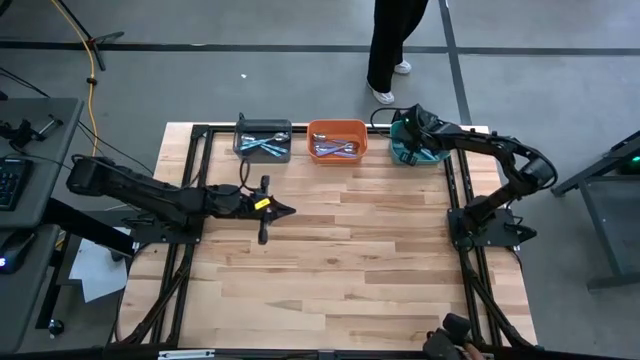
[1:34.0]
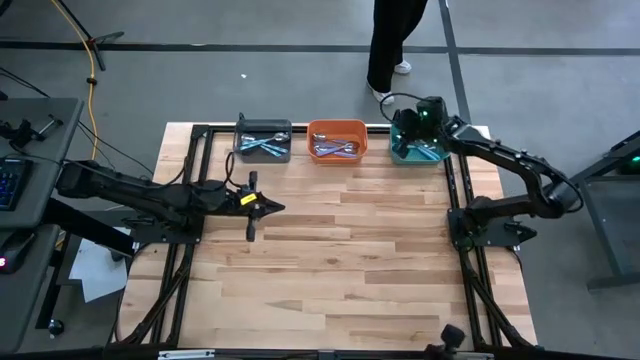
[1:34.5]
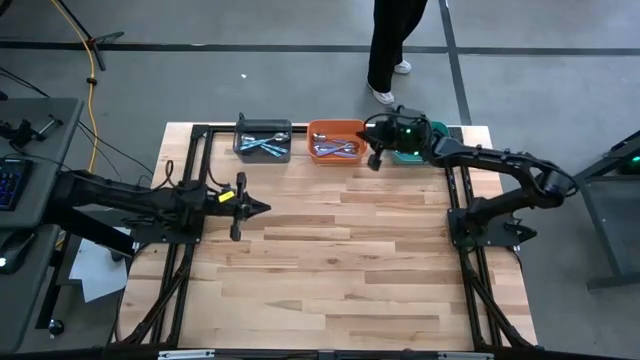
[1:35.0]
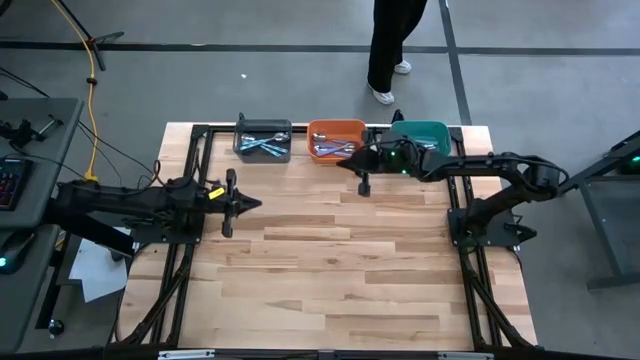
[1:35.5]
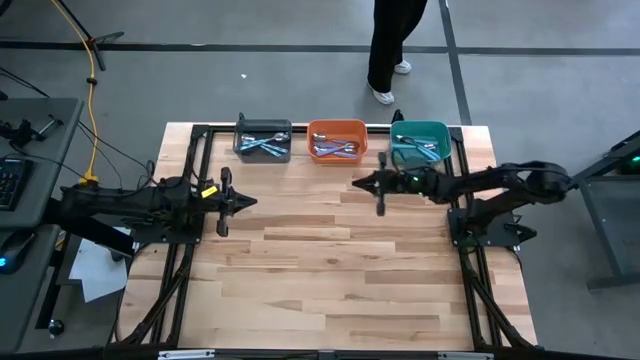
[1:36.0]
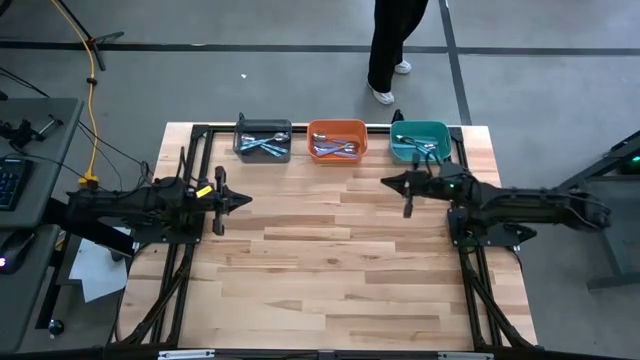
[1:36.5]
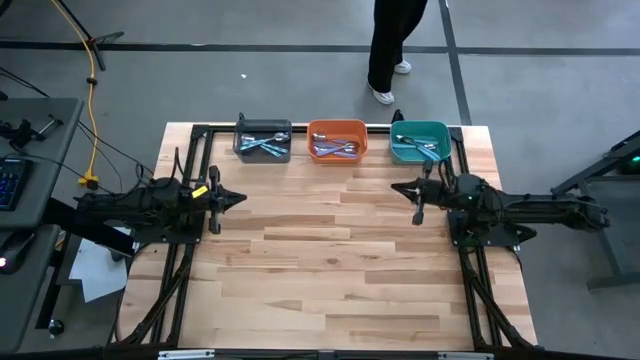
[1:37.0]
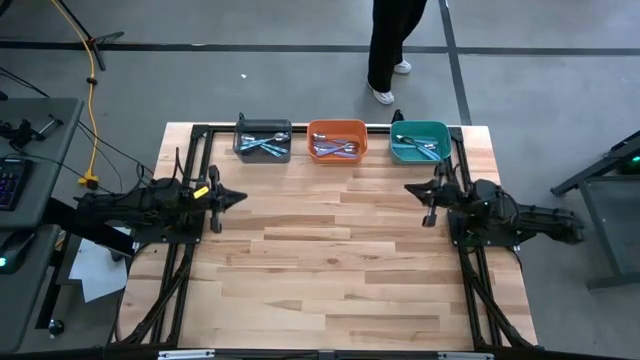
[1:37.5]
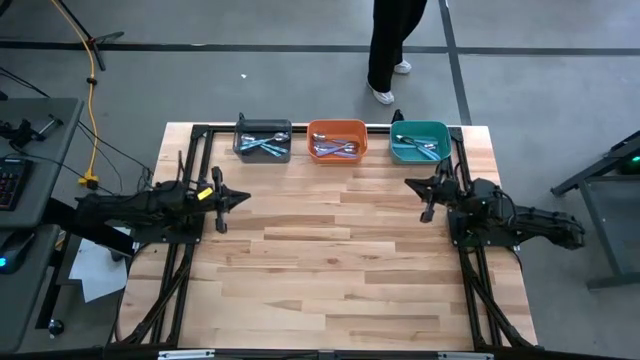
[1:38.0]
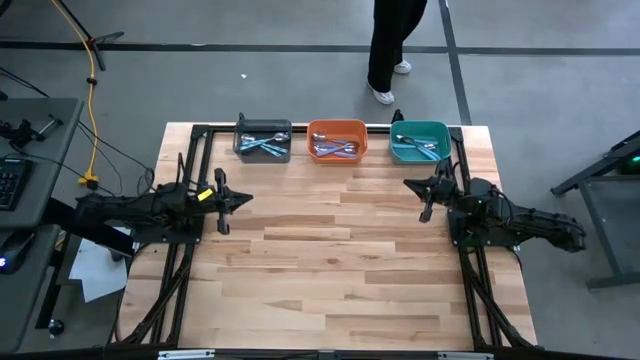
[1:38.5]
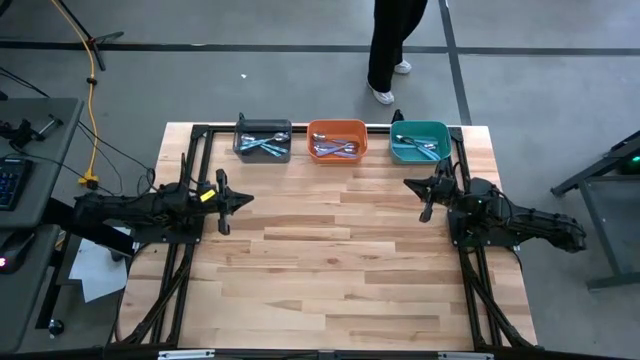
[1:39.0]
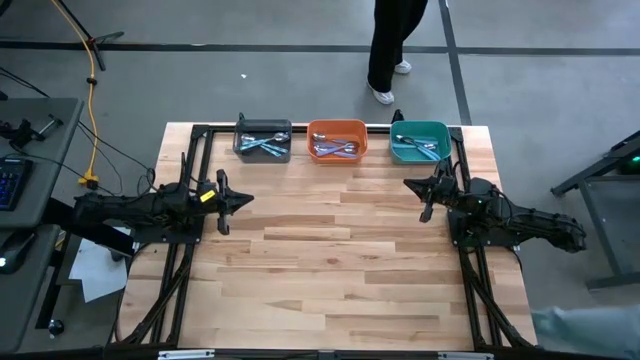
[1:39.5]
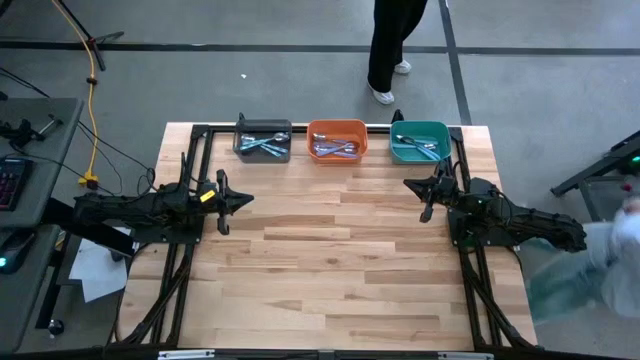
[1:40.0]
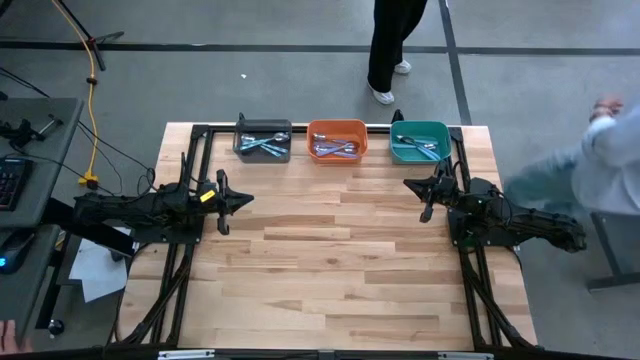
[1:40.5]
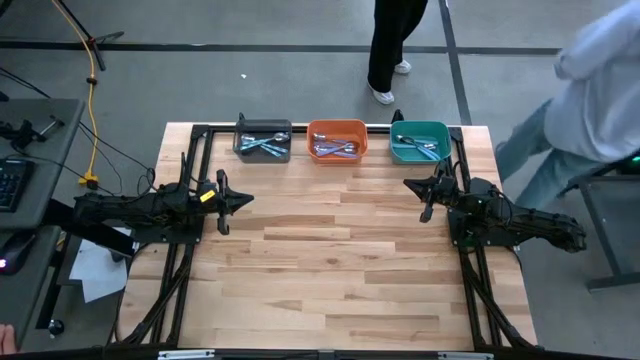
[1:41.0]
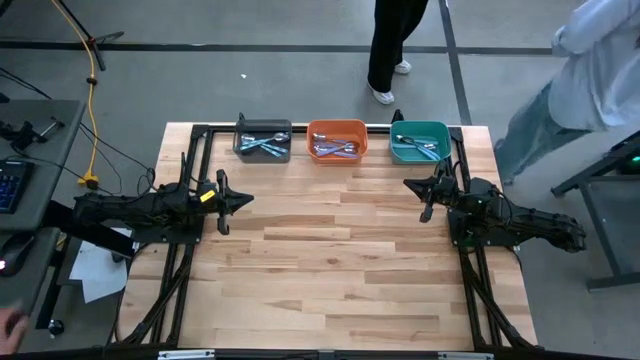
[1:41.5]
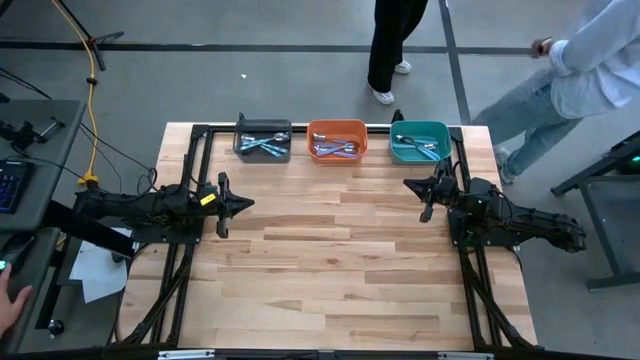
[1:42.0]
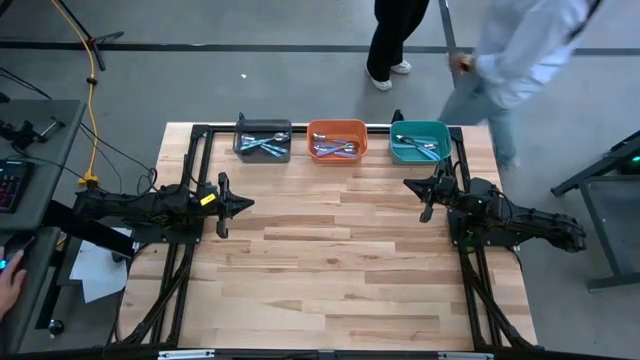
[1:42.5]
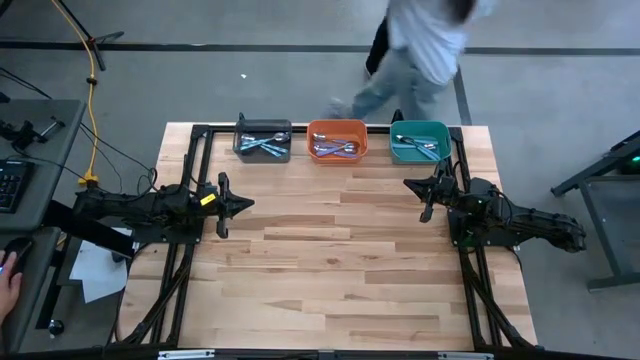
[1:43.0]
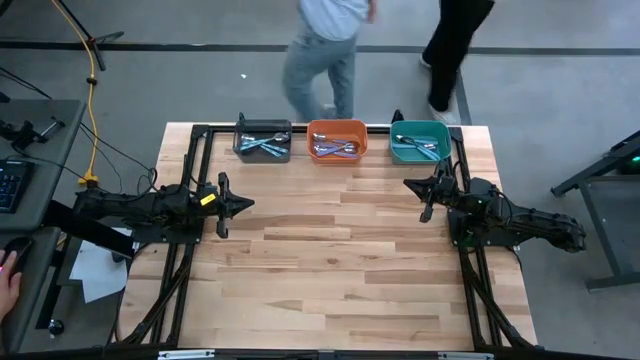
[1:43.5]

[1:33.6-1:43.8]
Task: Sort silverware by color (type)
Return to Home Position

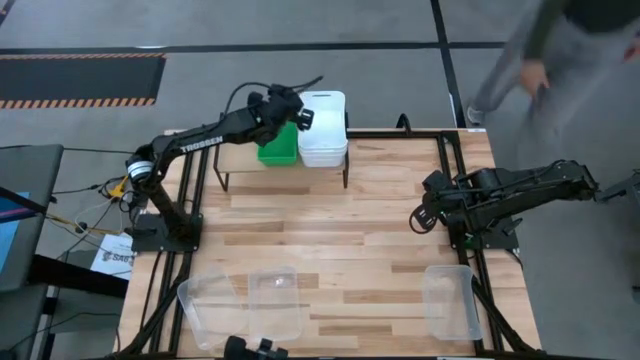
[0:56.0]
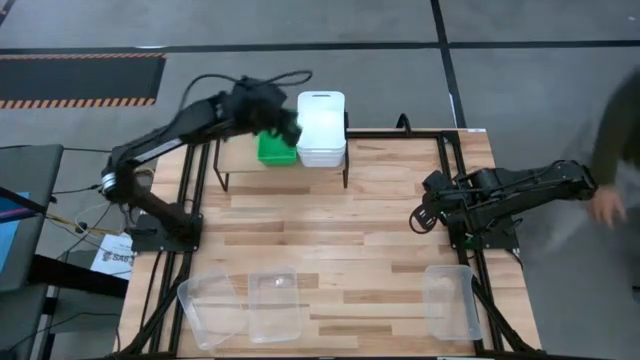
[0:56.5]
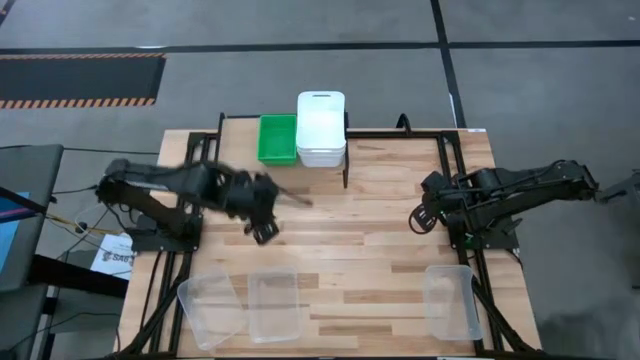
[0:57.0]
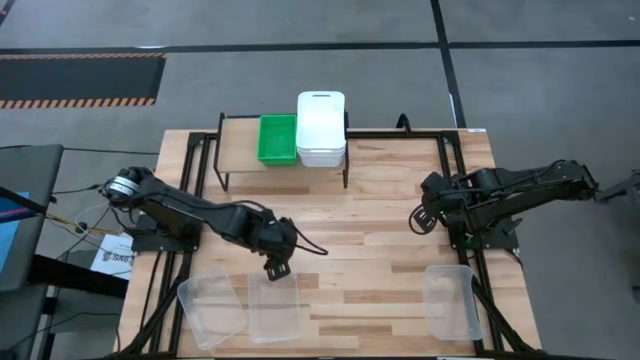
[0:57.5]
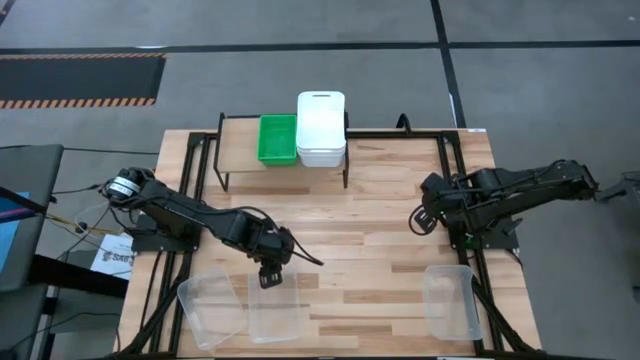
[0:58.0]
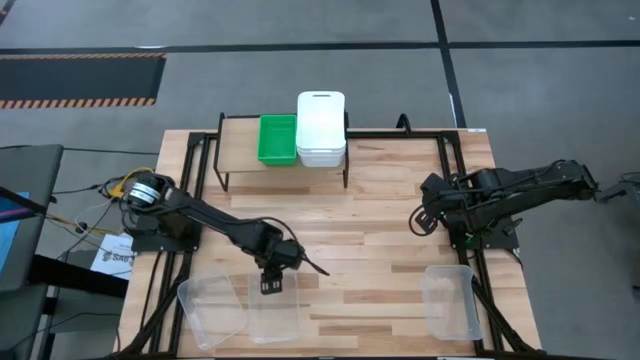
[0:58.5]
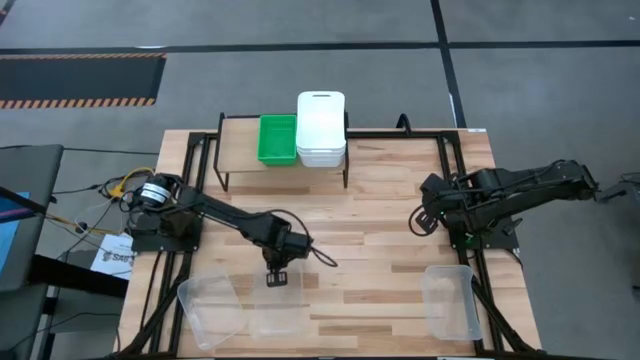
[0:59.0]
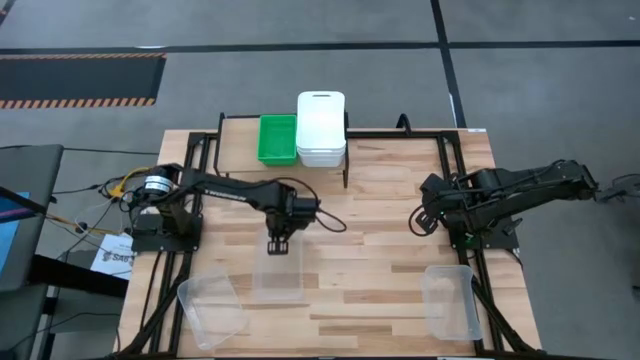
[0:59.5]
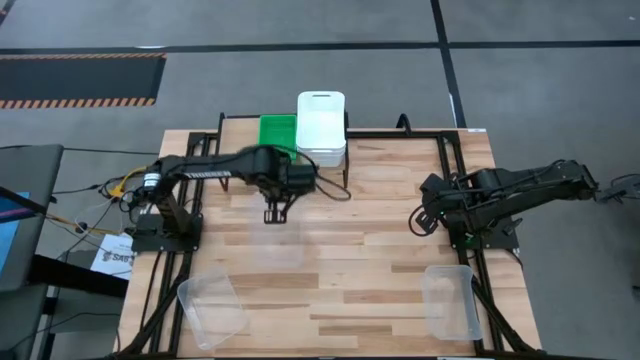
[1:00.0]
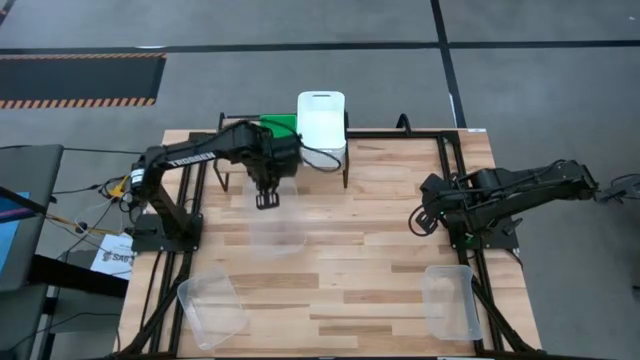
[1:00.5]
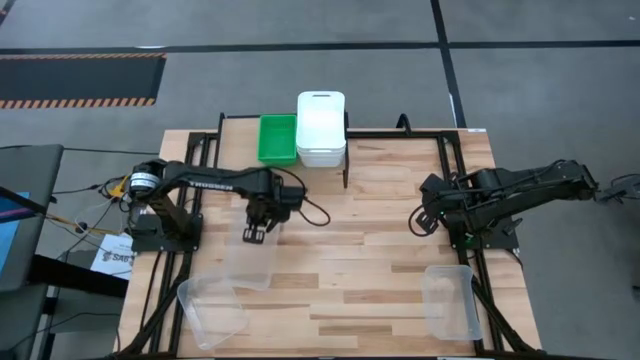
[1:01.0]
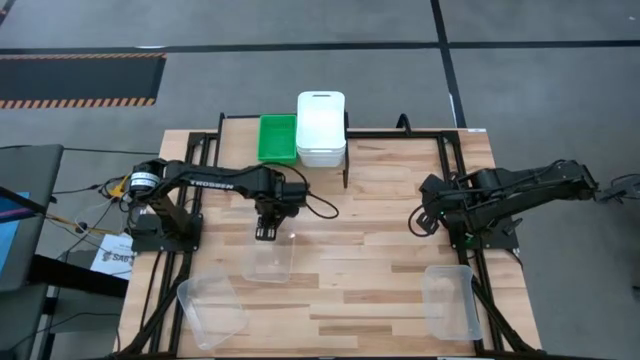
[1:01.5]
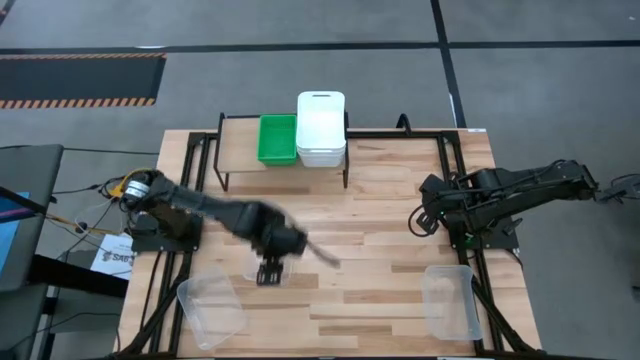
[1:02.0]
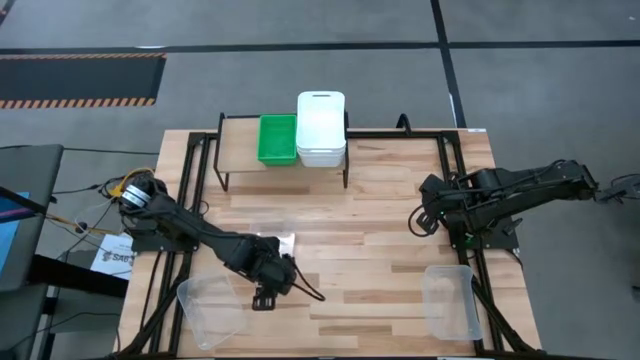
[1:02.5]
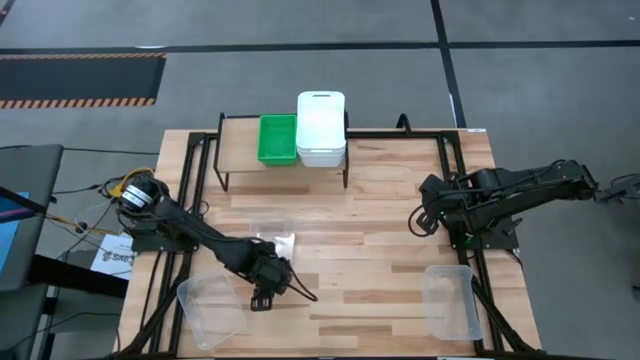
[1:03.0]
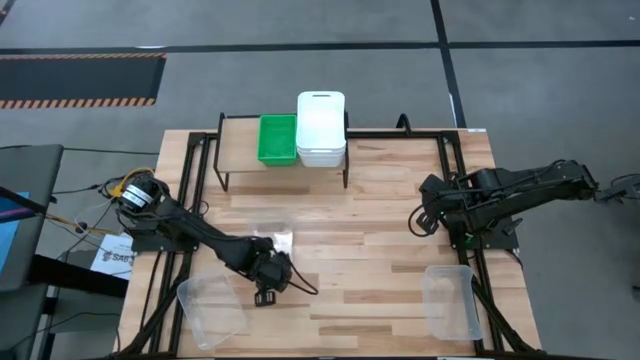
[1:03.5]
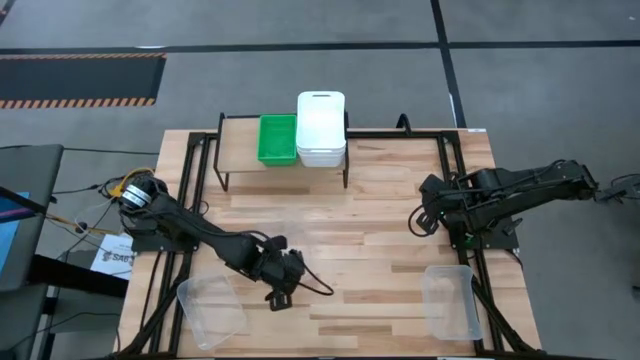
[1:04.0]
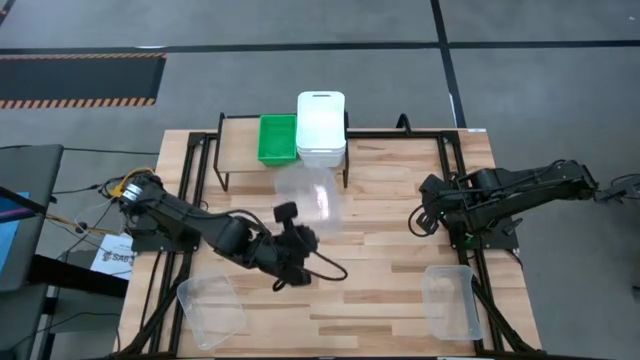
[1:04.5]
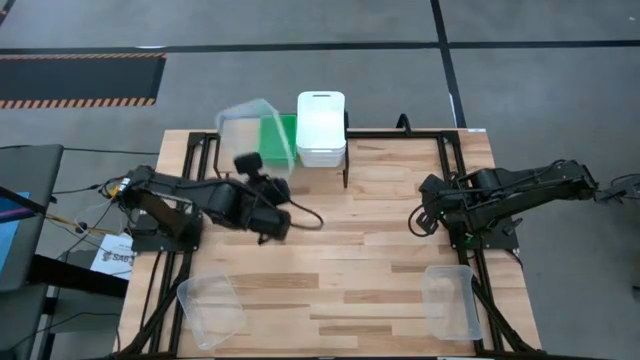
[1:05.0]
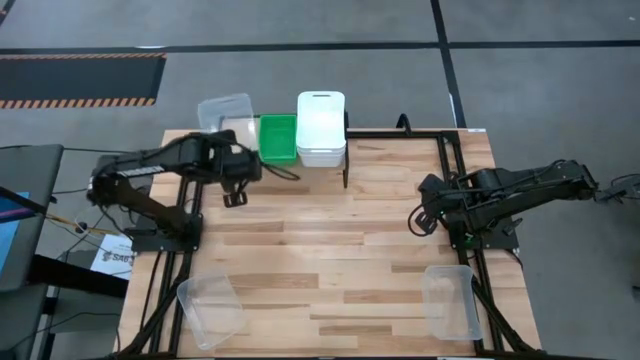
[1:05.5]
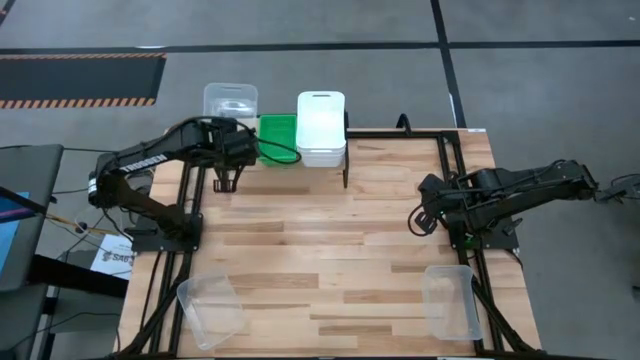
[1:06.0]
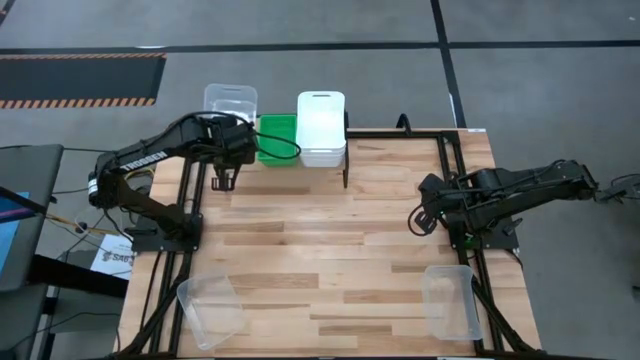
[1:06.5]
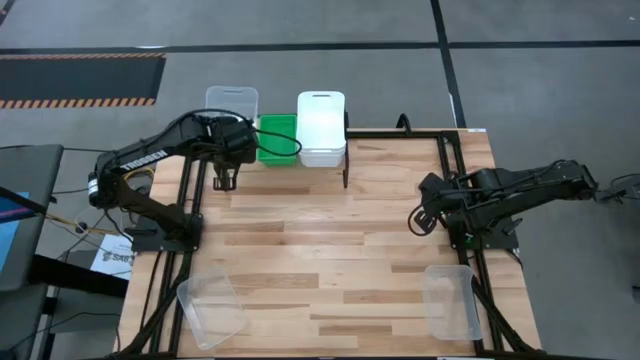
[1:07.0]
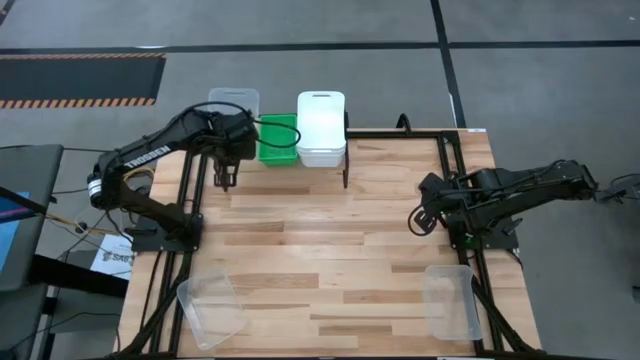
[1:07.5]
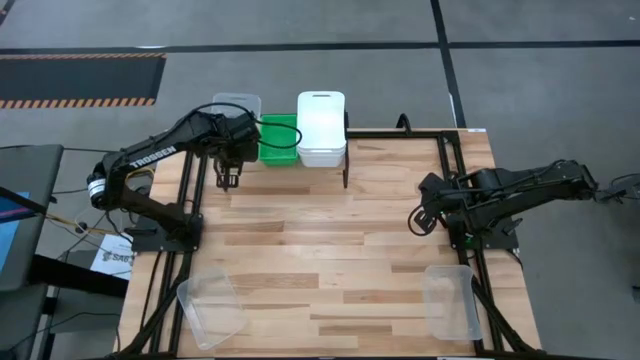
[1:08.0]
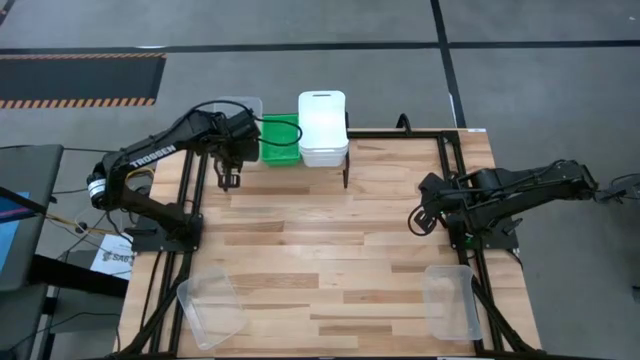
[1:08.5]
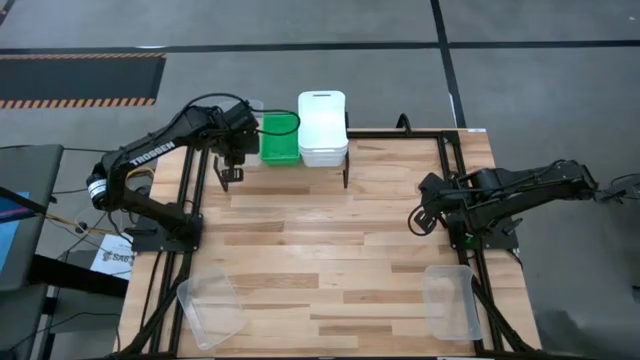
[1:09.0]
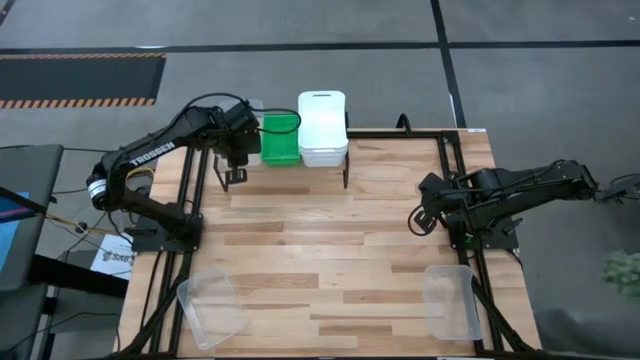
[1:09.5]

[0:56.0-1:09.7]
Task: Stack baskets on shelf by color
Put the middle transparent bin on the shelf
